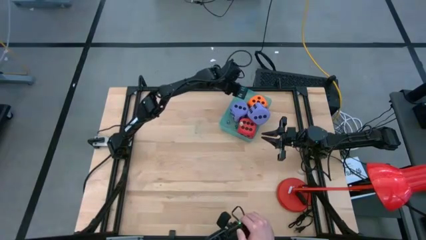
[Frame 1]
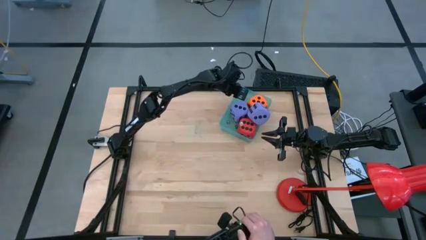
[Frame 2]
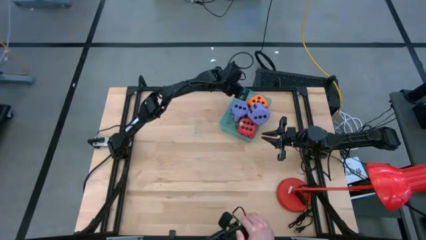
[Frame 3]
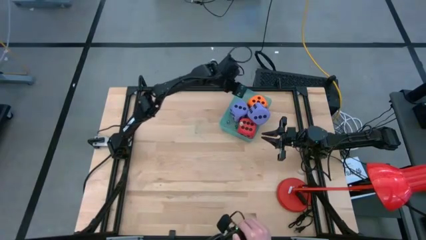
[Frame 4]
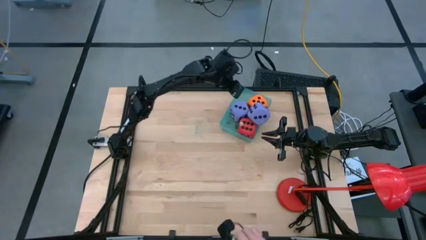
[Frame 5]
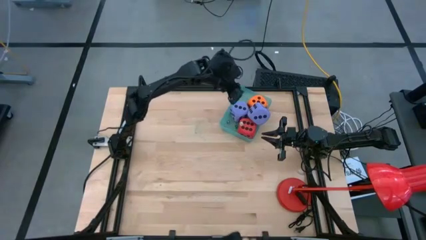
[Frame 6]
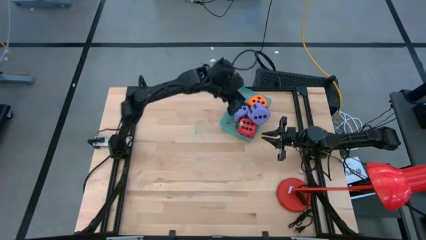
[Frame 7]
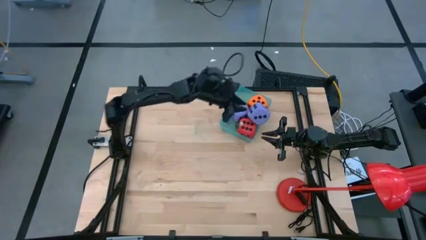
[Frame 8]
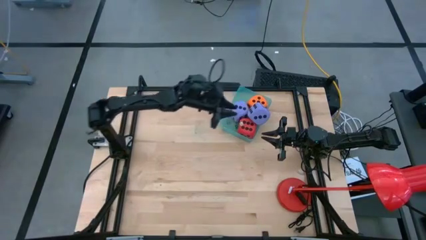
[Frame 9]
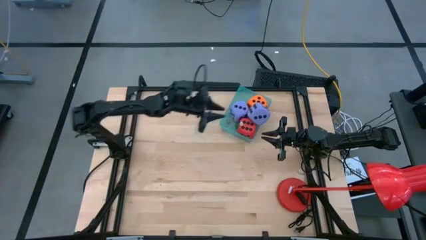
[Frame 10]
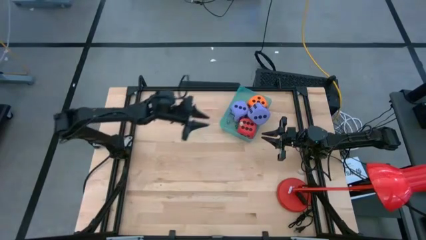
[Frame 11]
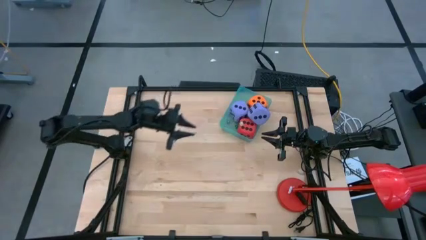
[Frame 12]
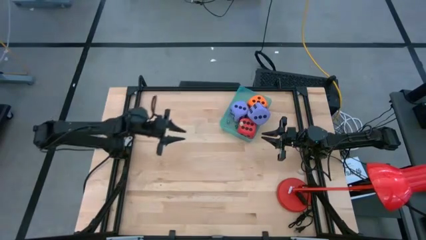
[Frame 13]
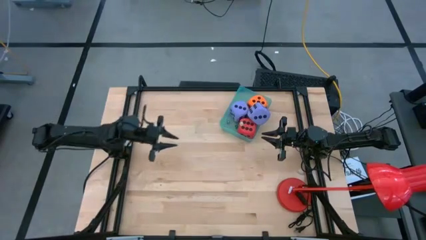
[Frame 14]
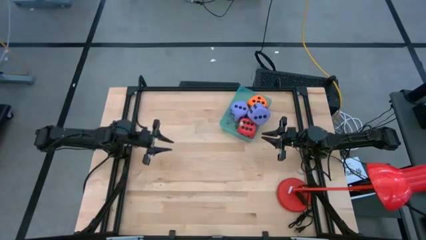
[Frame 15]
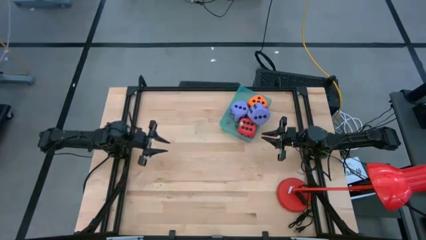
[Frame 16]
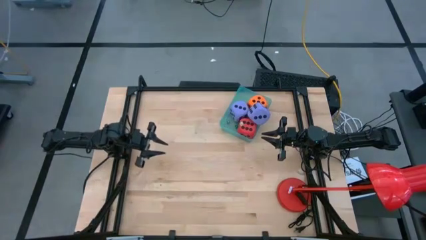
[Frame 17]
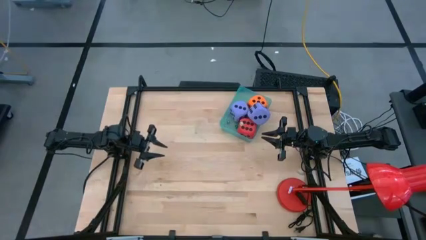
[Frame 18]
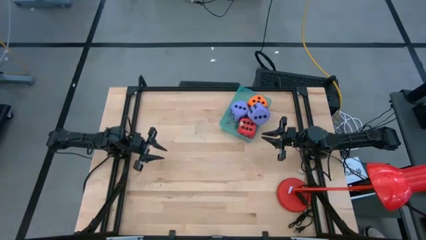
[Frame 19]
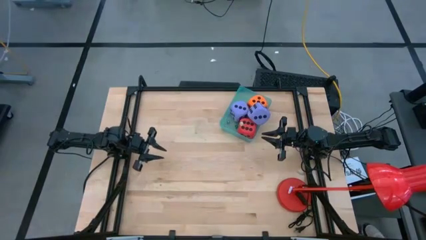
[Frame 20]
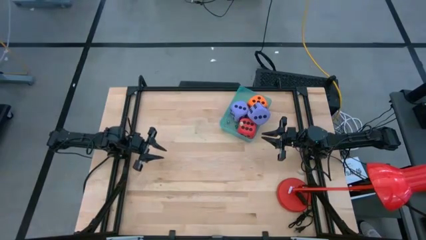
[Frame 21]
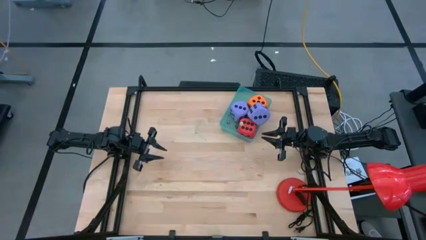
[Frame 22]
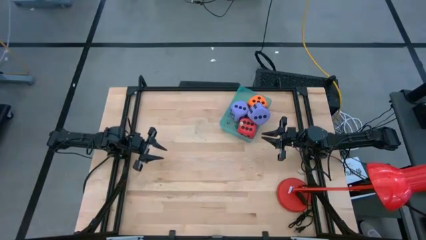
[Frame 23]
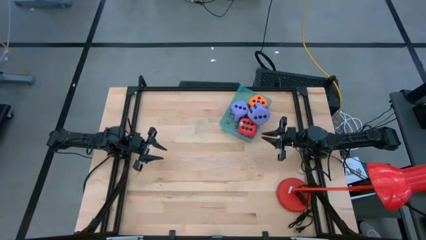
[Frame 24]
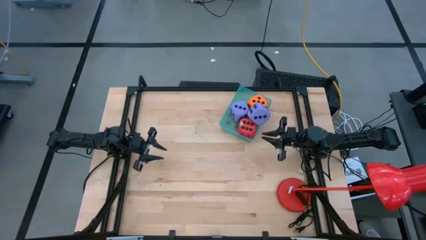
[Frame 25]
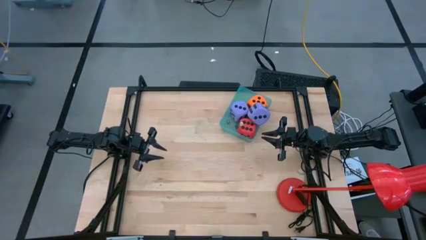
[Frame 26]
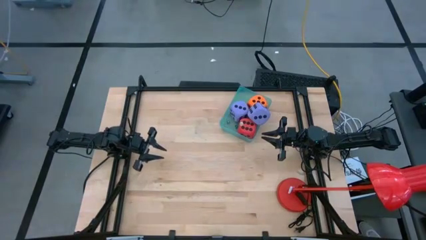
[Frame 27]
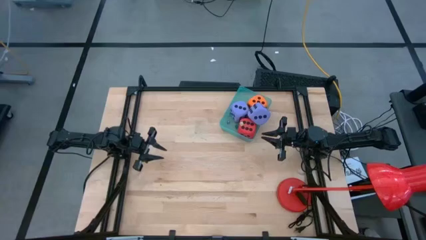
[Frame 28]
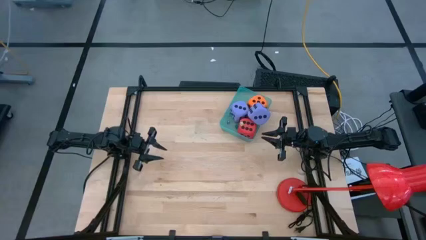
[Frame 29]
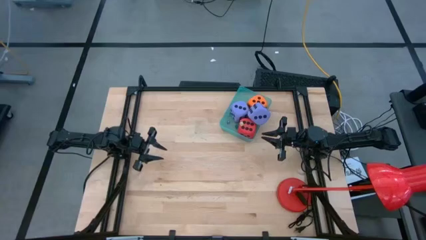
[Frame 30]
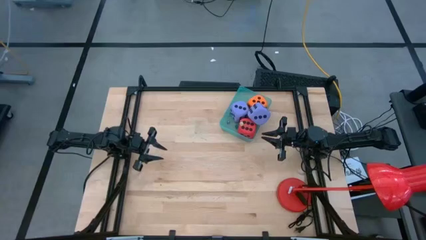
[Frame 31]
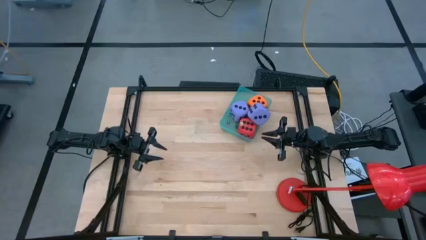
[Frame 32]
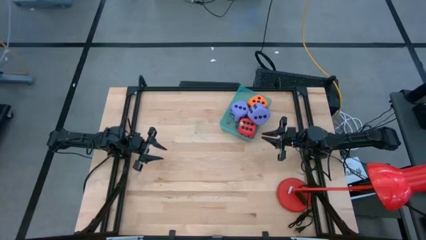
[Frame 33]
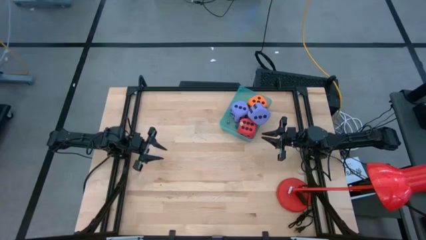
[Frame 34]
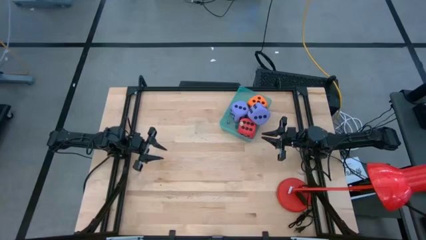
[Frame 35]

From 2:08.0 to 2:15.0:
Task: Pick & Place Dice
Return to Home Position

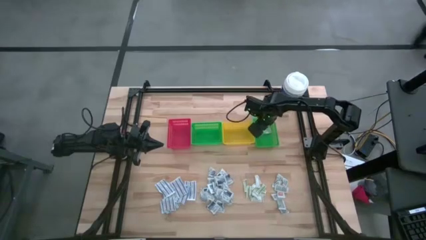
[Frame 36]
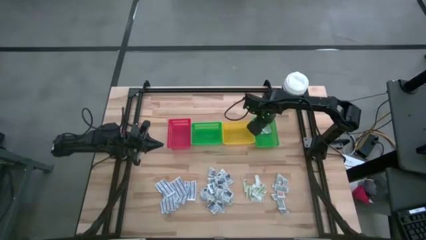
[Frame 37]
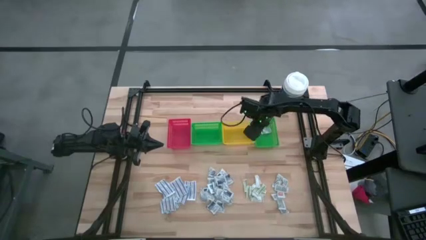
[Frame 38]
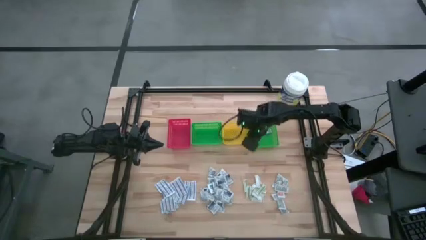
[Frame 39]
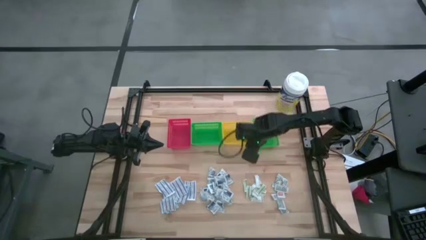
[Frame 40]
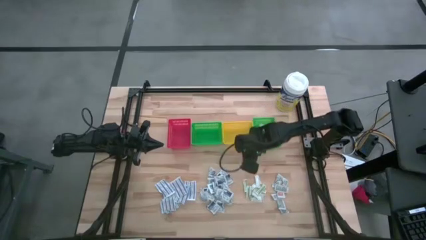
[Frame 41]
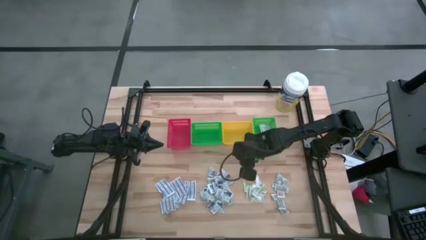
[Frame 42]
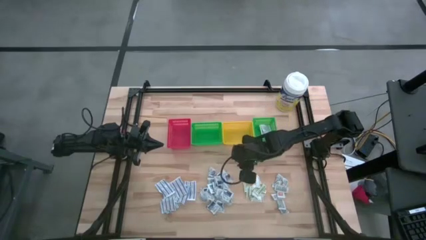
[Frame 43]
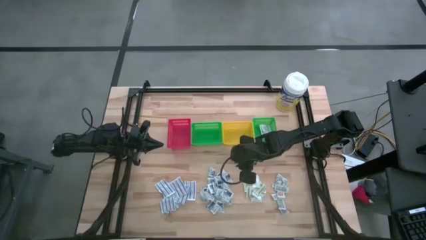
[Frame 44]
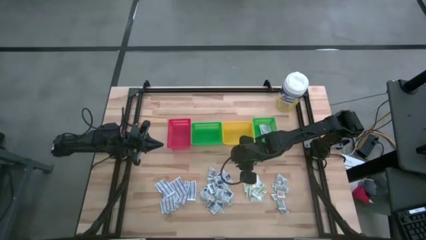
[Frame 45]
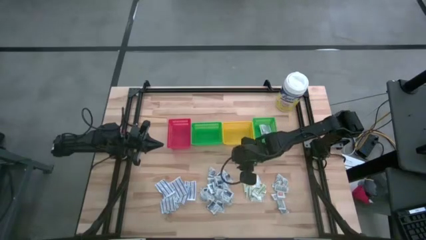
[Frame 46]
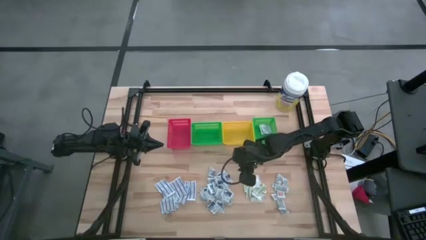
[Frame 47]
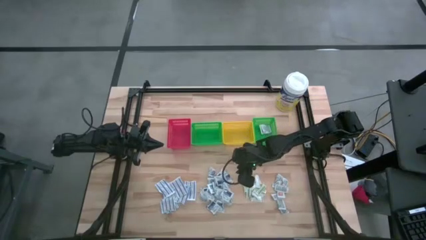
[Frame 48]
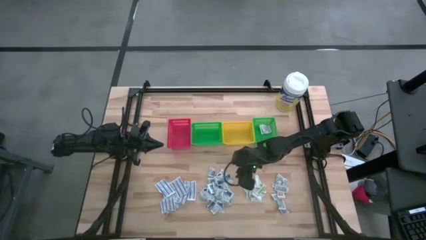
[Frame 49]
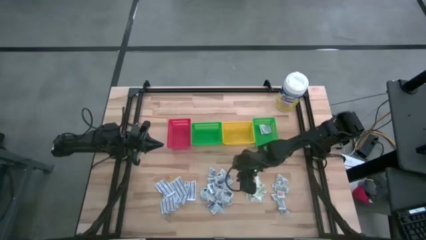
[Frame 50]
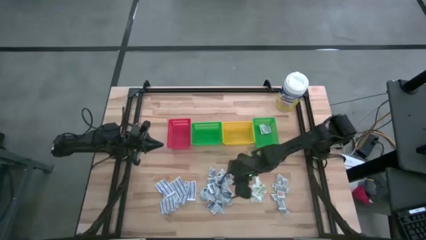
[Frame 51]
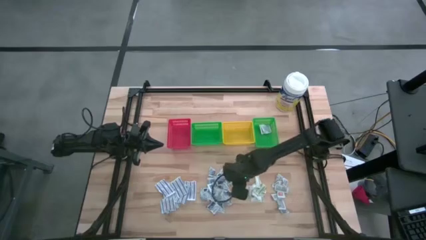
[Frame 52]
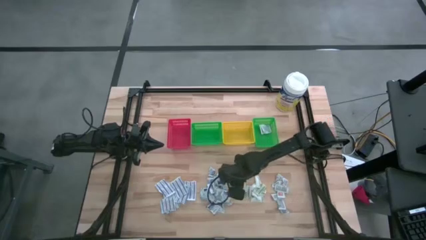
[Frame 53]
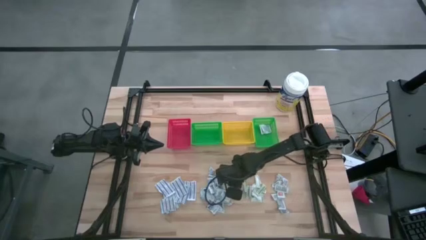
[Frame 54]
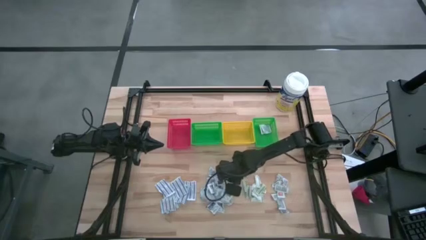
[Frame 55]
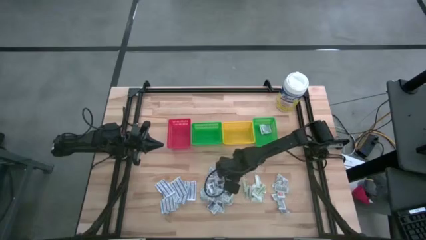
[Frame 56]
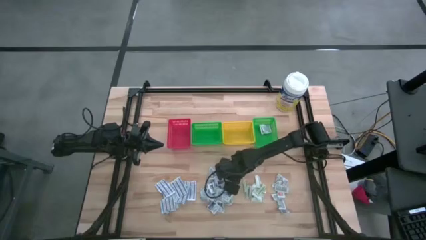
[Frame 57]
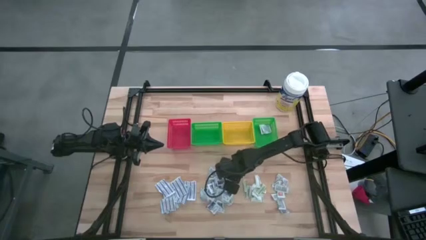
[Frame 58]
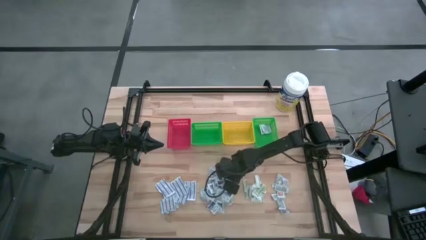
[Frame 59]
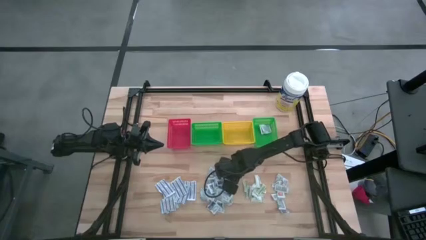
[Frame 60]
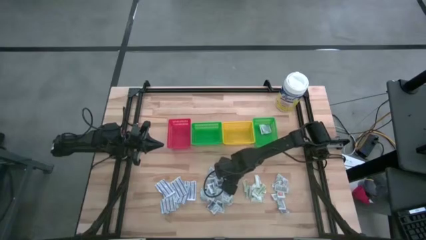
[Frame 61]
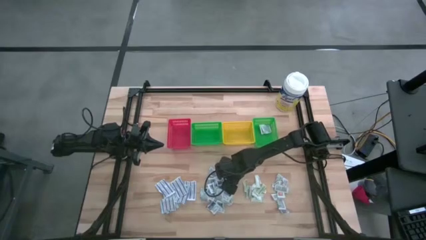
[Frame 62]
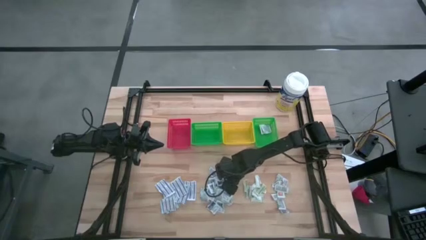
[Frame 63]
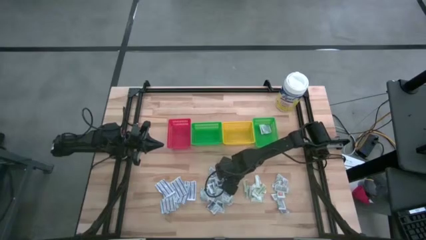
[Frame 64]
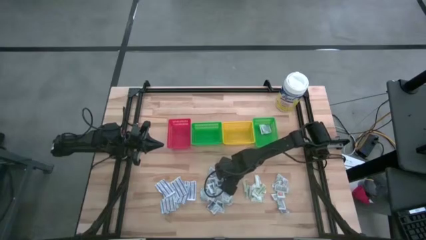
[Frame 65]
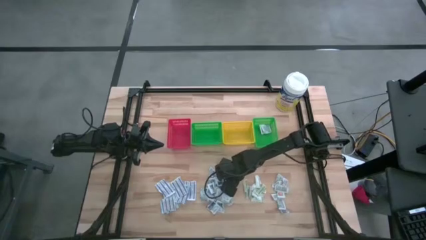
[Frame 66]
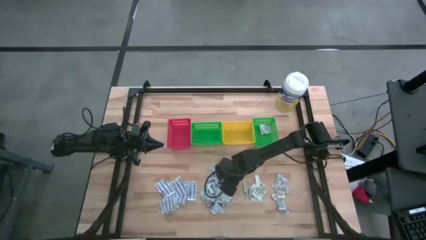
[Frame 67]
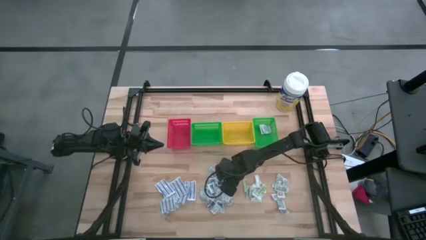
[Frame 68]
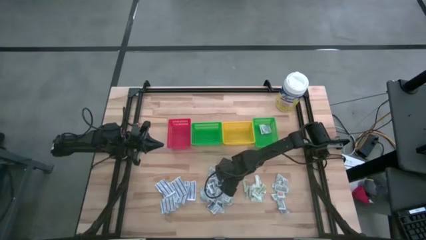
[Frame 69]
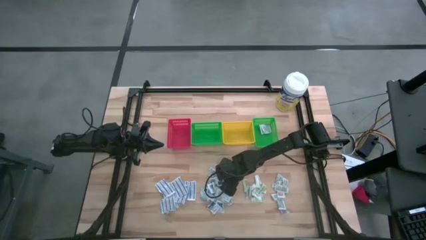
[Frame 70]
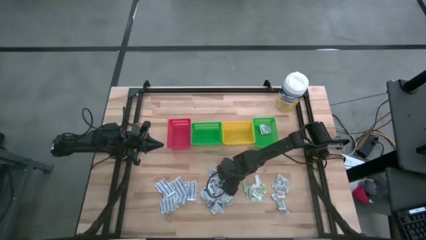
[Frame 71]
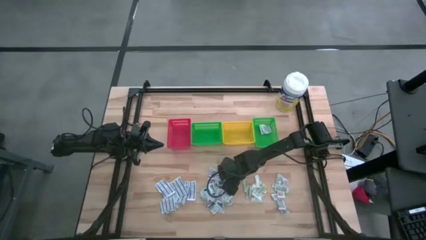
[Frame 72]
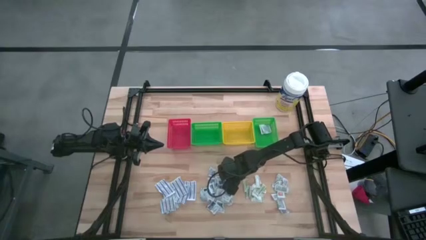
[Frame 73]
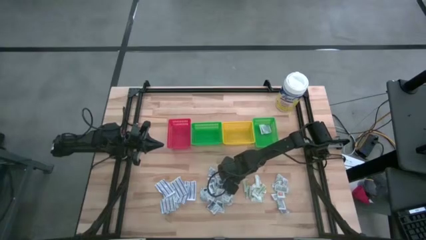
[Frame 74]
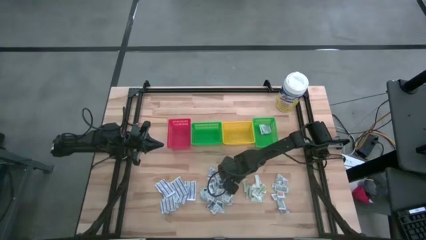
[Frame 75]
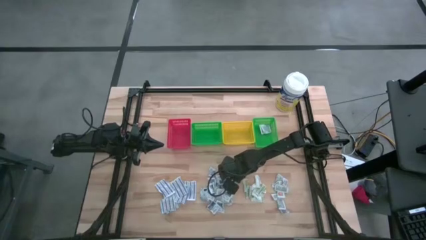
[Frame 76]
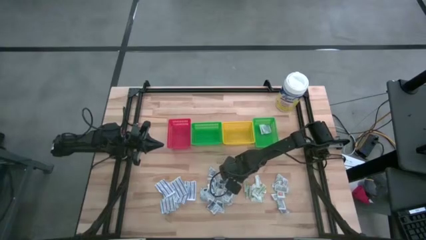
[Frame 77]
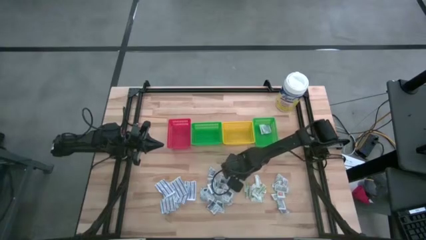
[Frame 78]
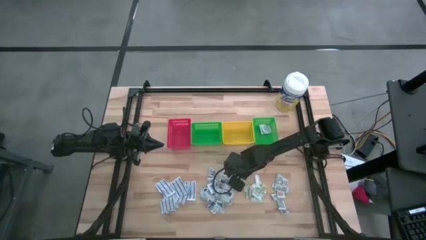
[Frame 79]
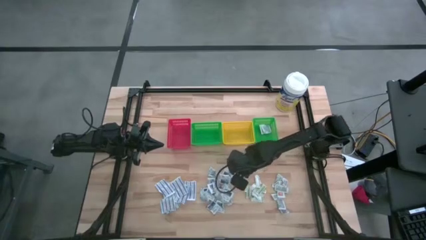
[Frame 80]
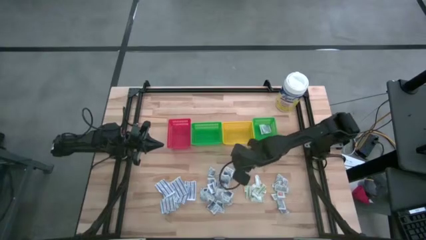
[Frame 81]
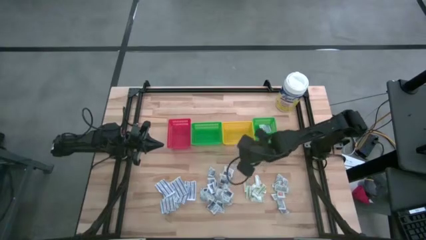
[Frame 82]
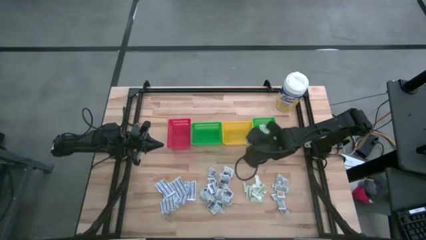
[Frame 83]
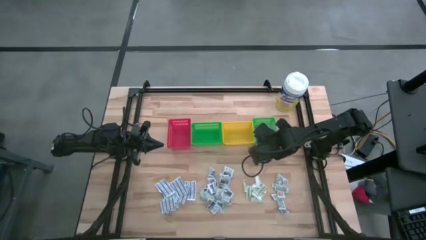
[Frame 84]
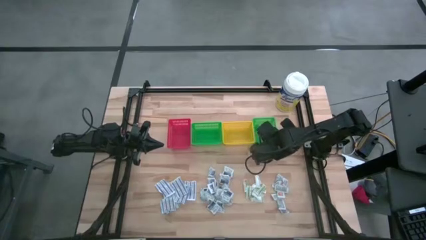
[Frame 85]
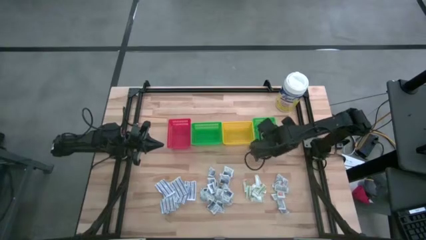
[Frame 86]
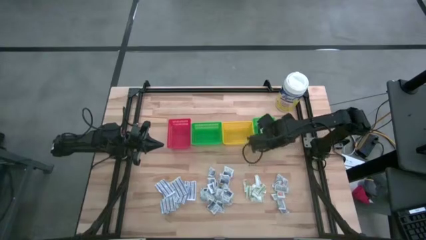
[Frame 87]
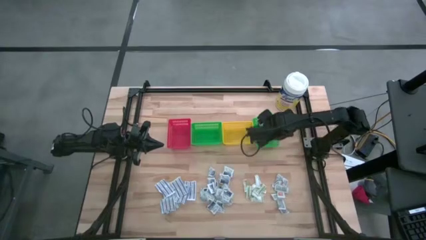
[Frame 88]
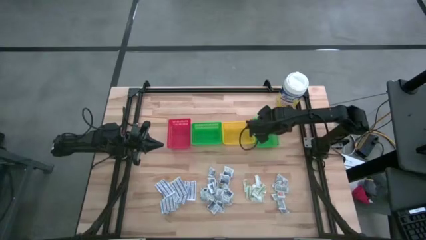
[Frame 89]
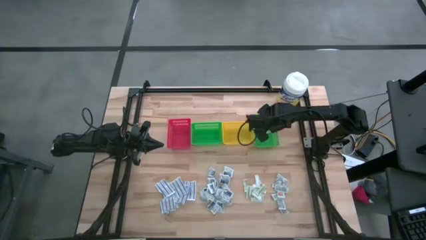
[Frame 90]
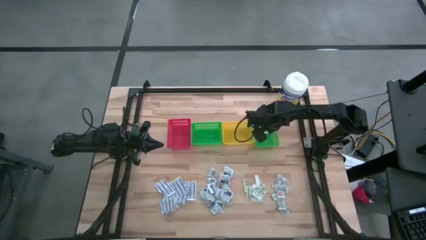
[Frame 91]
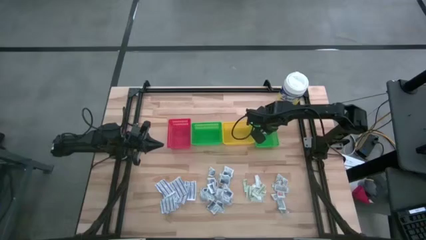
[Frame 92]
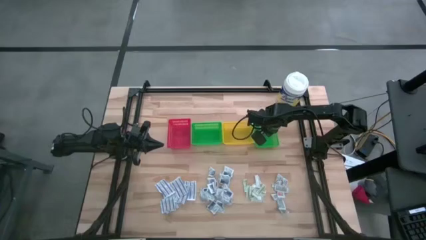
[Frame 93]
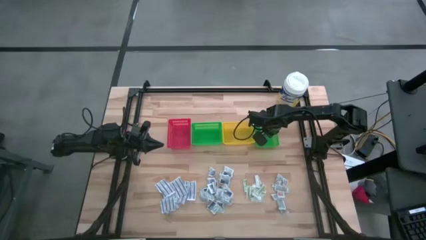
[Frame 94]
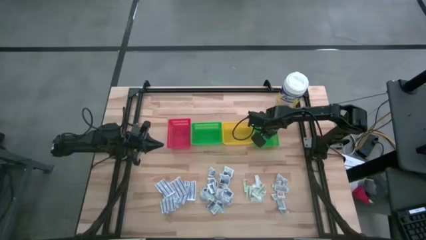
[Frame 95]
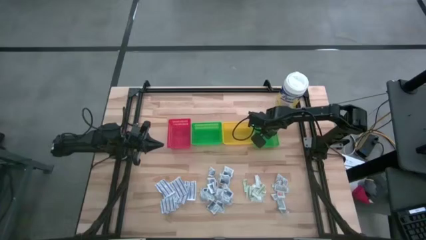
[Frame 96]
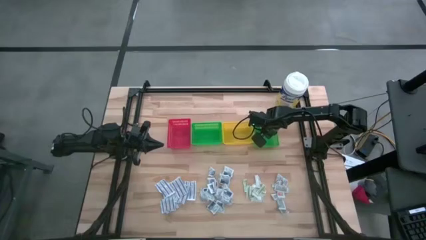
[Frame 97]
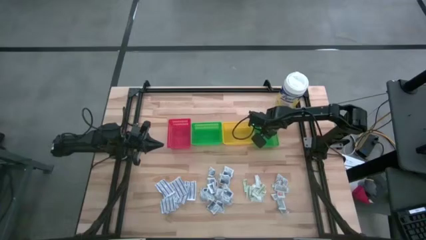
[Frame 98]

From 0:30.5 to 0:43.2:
Task: Pick & Place First Aid Supplies
Put the blue alcohol pad into the right green bin
